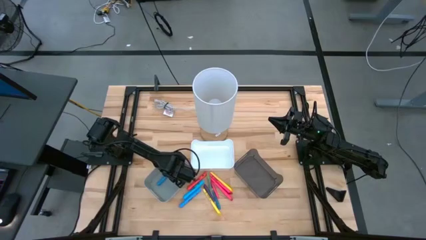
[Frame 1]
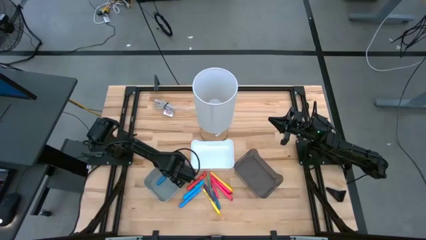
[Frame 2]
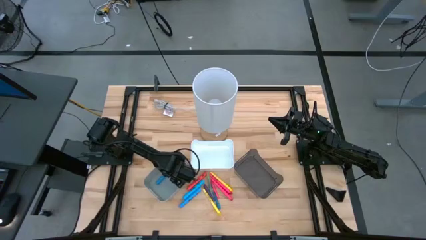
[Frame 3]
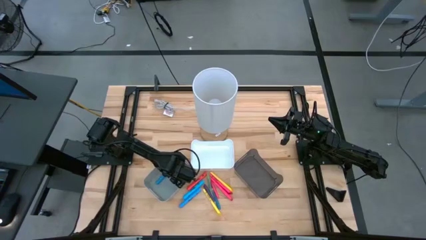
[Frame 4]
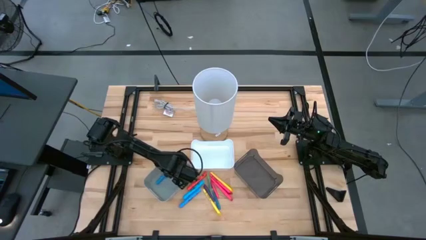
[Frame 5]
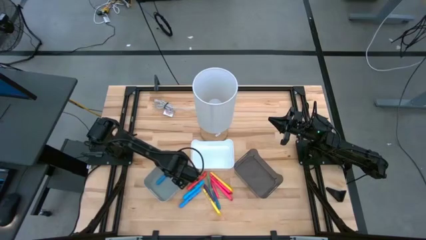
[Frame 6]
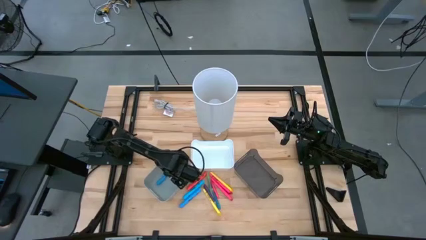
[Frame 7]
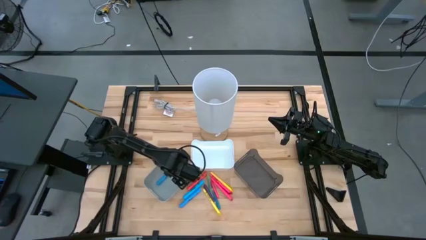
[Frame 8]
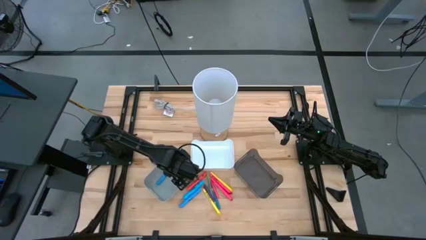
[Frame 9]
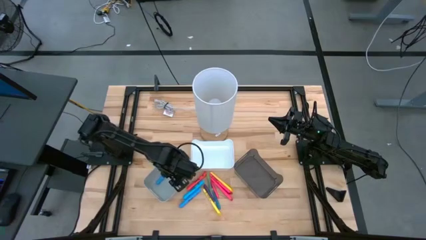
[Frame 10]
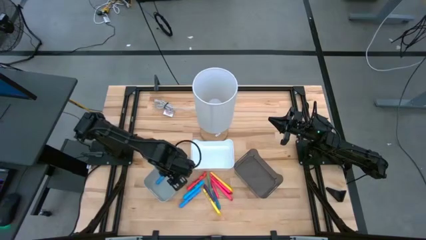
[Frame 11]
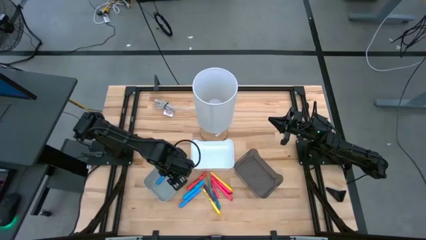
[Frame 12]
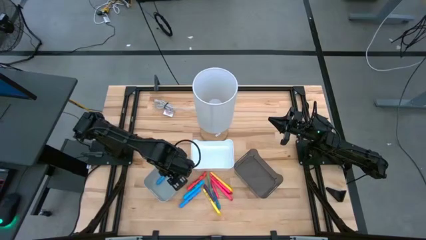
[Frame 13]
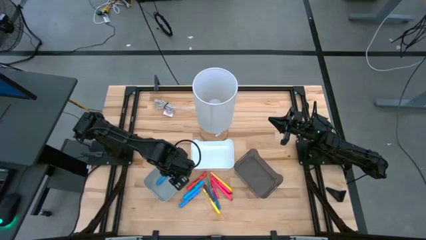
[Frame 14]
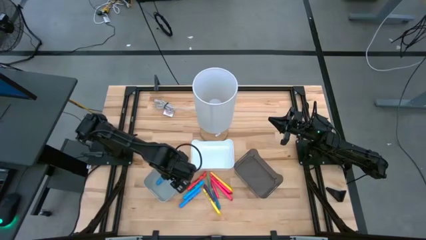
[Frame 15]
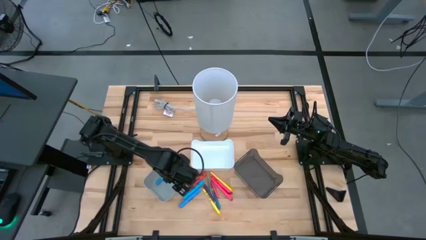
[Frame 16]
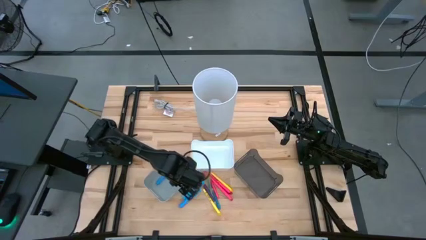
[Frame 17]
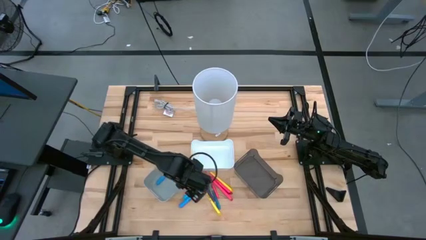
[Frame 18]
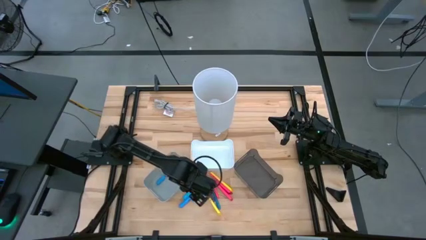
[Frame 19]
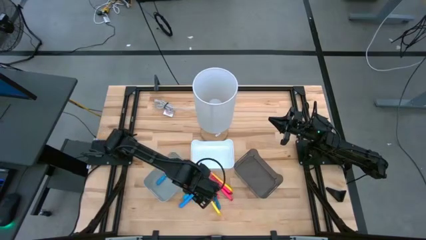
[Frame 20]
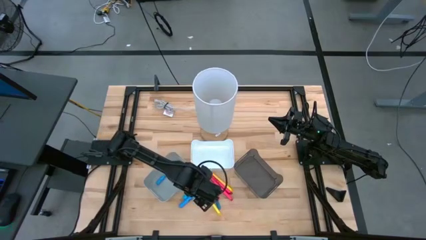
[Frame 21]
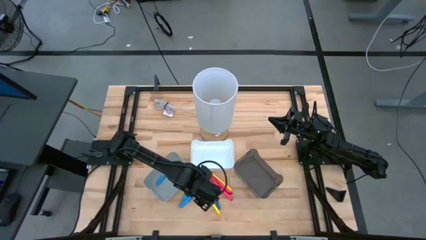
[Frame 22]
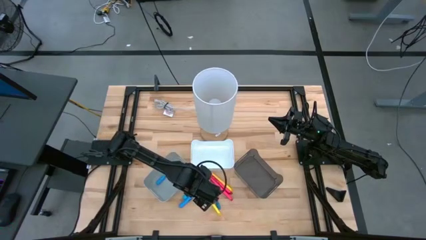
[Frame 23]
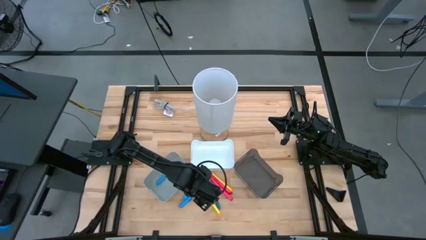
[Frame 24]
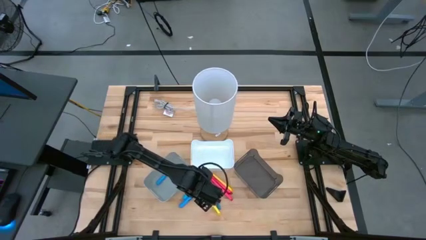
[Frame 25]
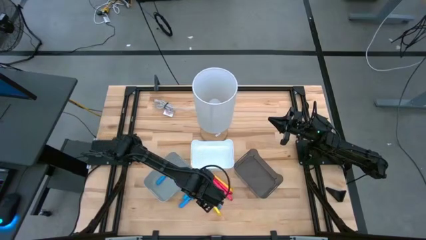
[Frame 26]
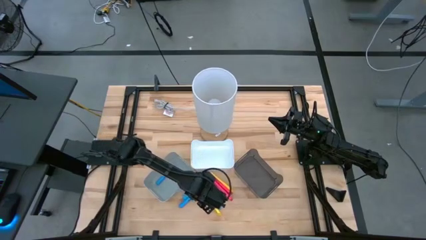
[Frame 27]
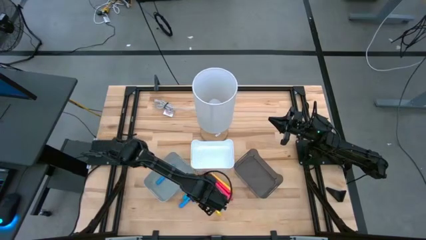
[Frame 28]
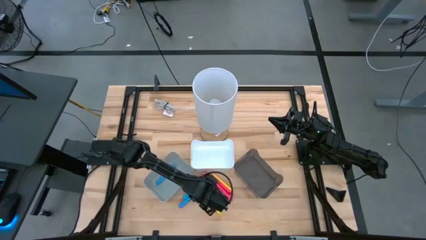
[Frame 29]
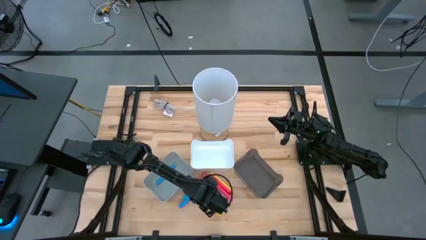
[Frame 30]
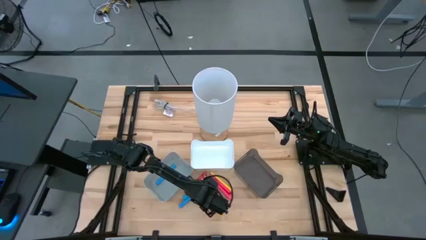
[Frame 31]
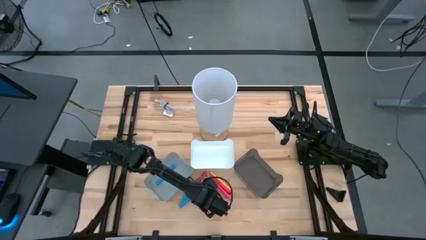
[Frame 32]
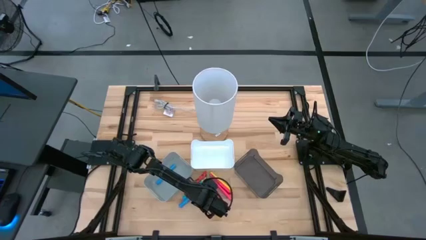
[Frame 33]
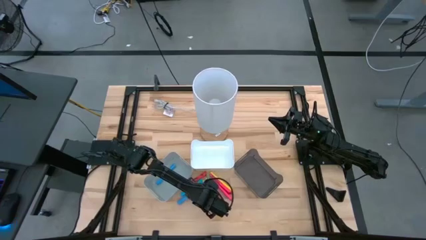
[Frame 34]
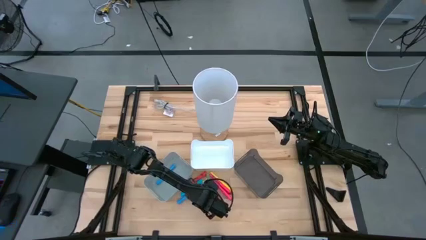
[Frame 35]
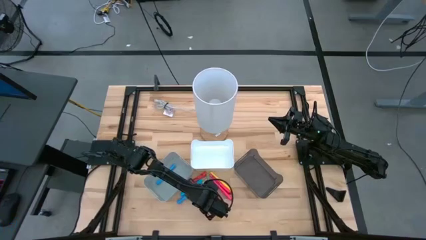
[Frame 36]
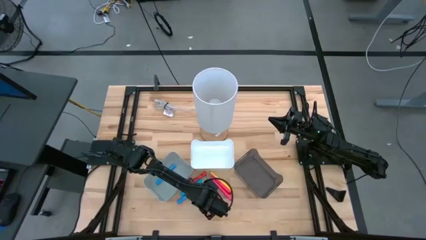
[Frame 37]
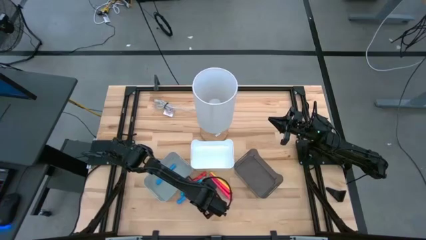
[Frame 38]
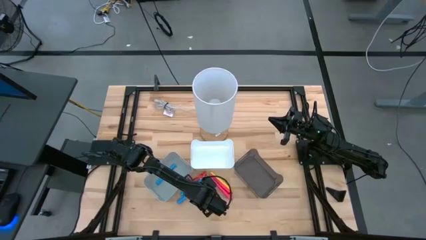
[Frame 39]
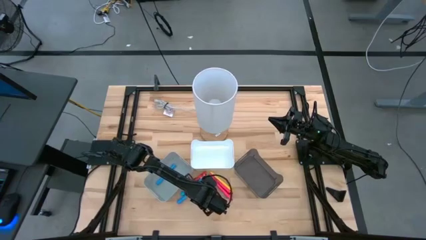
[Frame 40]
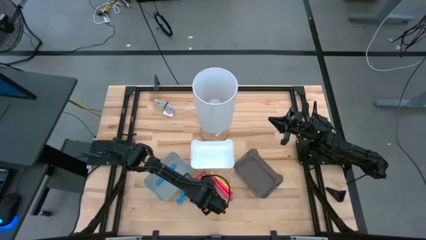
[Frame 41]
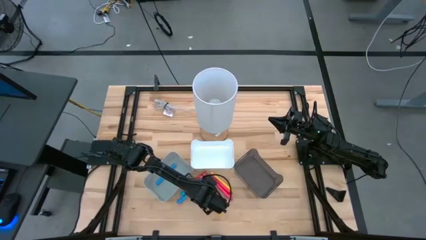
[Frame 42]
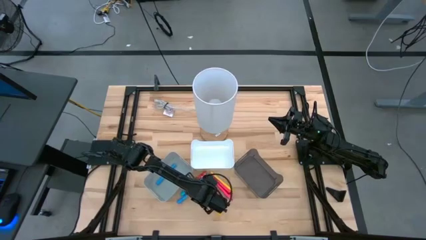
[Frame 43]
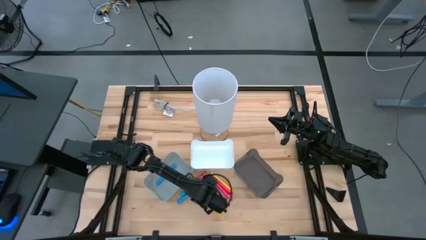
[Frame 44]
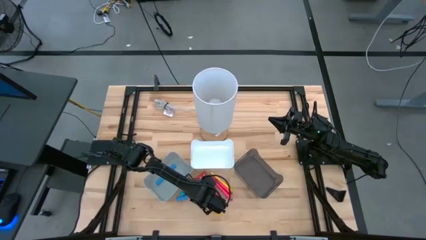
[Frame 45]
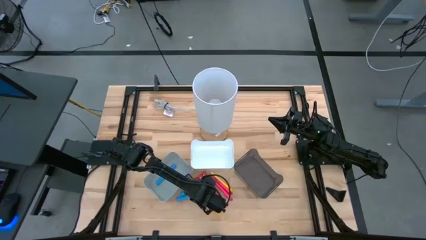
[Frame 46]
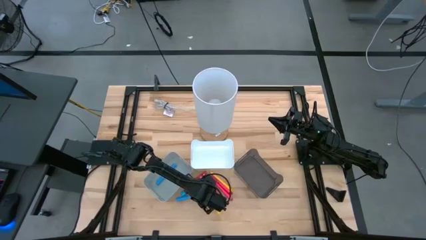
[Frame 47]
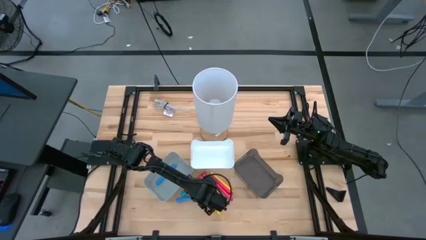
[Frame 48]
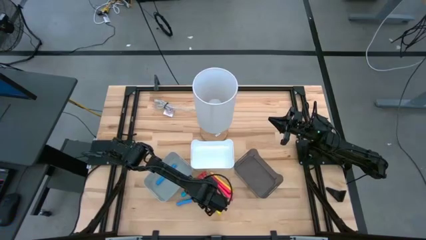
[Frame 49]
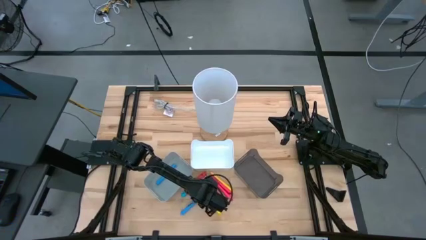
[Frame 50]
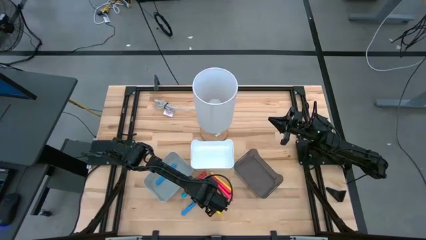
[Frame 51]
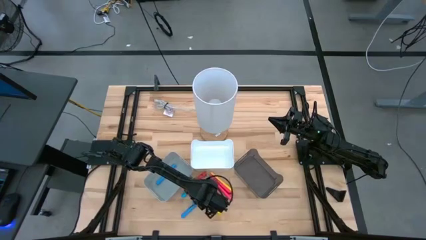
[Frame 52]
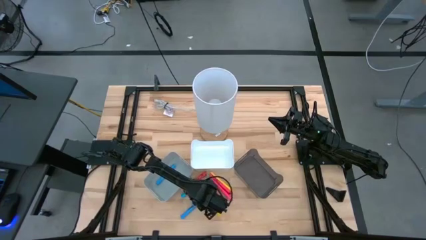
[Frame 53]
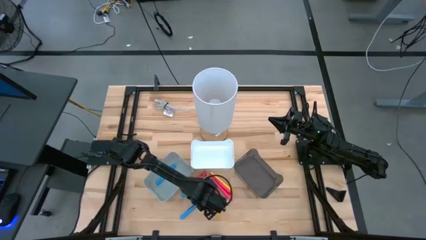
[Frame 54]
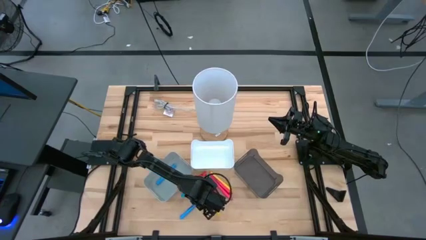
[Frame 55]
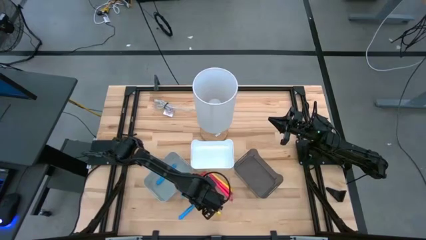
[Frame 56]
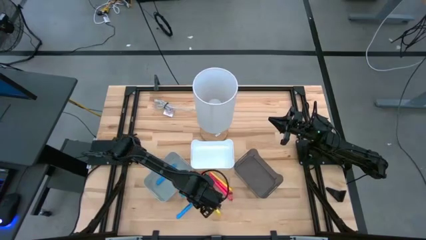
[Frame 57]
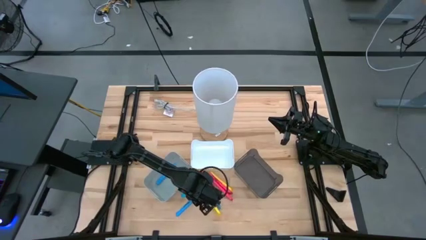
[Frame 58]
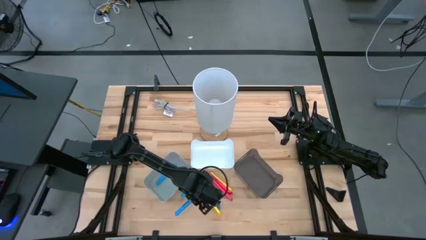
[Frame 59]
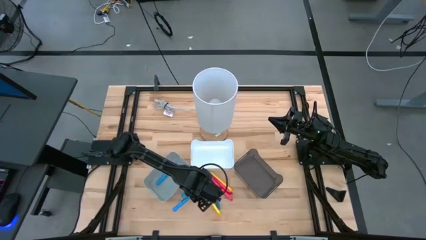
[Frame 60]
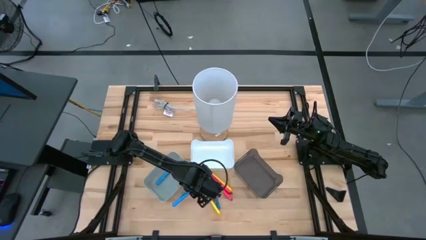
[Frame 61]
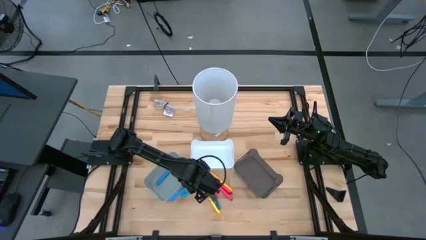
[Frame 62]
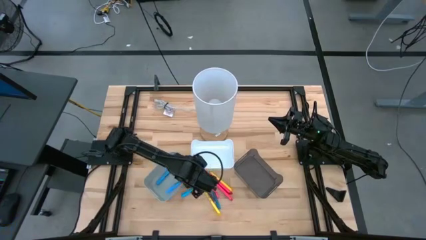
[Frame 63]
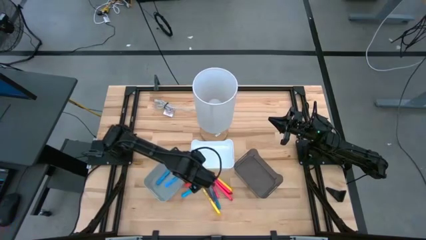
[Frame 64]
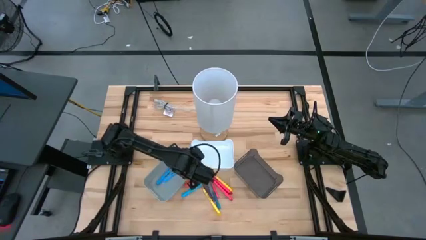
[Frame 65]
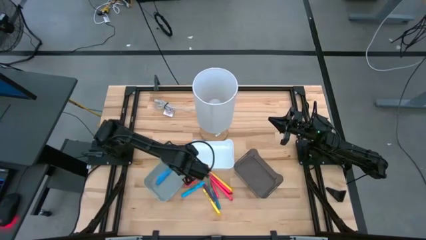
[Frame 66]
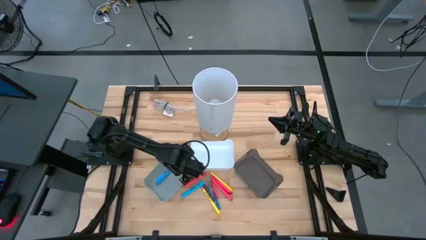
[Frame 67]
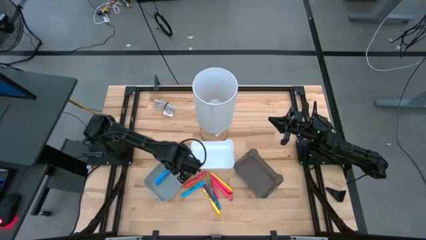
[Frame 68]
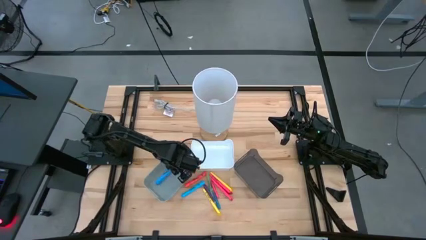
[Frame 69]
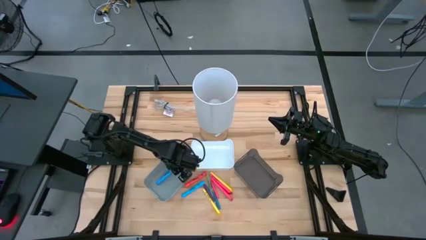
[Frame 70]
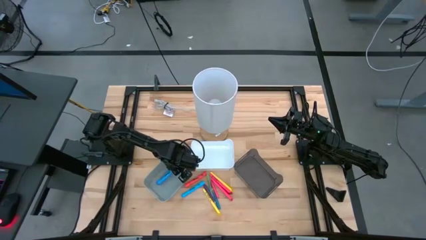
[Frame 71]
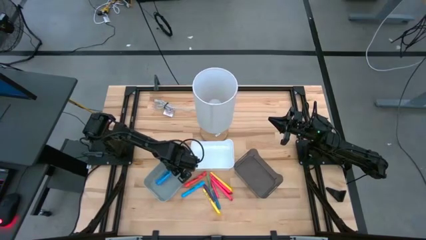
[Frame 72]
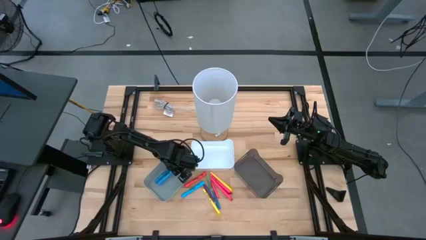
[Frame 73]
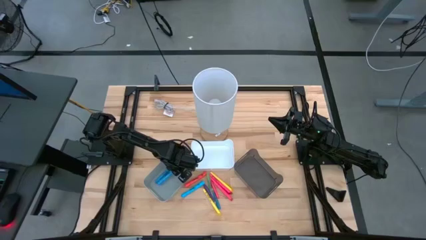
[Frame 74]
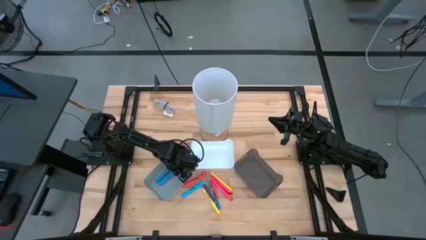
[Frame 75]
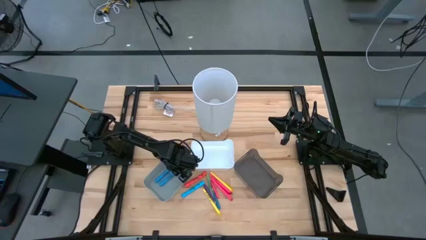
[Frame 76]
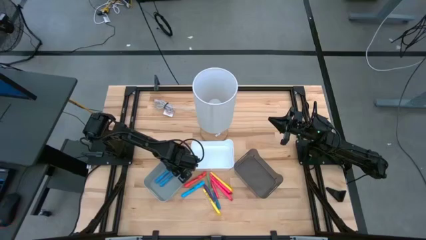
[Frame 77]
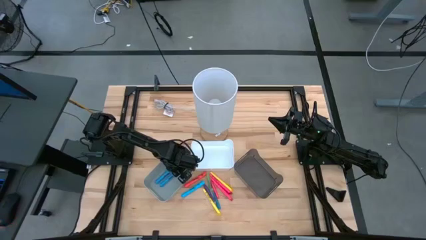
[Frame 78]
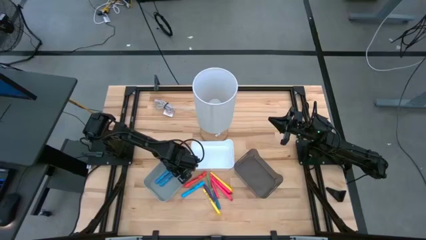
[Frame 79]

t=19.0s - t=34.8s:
Task: Pick & Place Markers
Put the bottom blue highlighter pen in the gray bin
